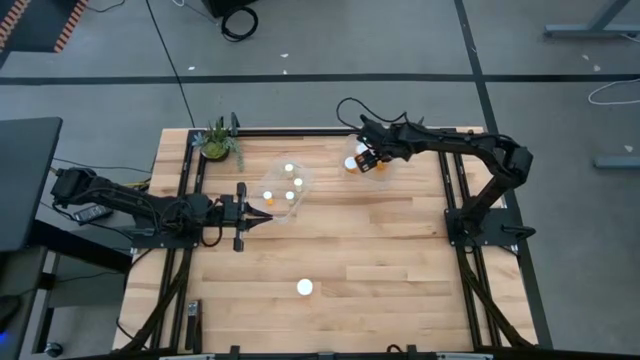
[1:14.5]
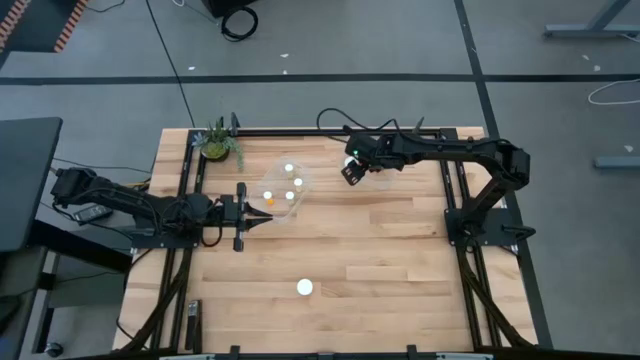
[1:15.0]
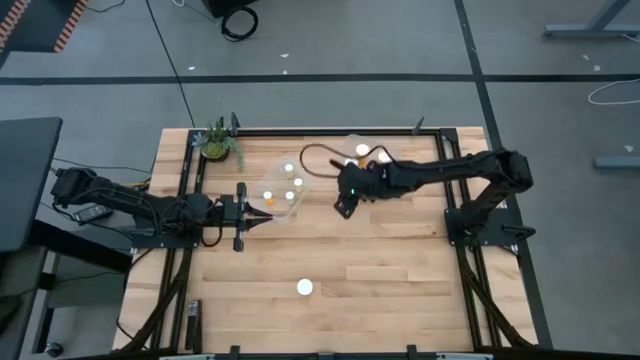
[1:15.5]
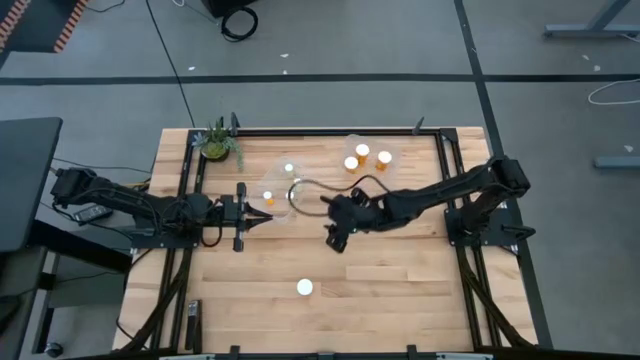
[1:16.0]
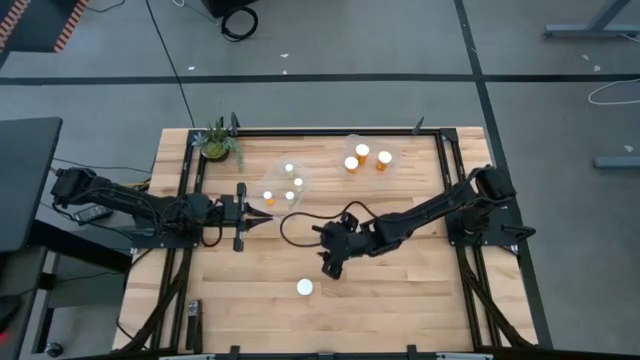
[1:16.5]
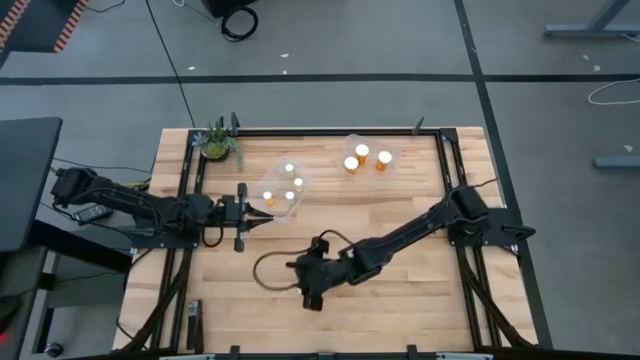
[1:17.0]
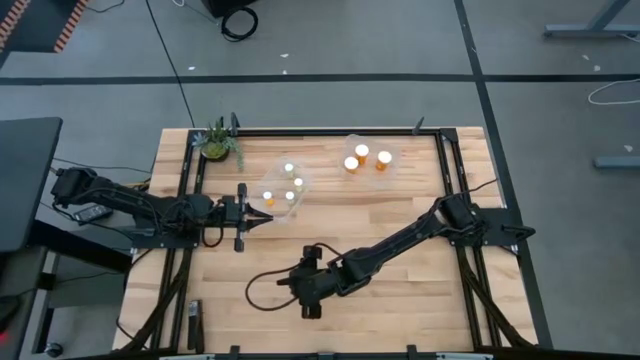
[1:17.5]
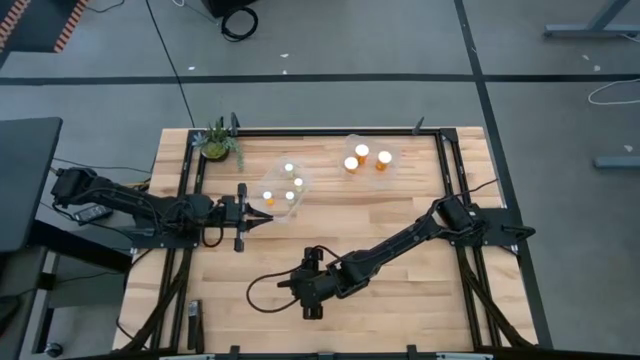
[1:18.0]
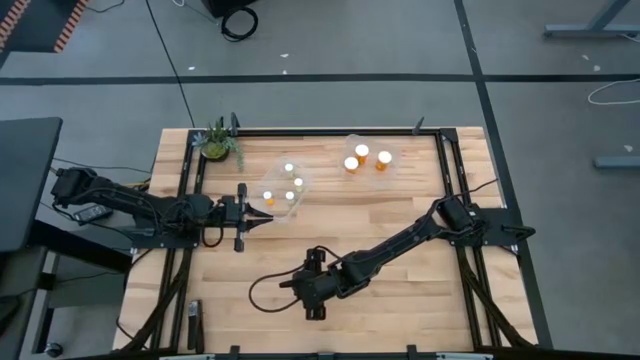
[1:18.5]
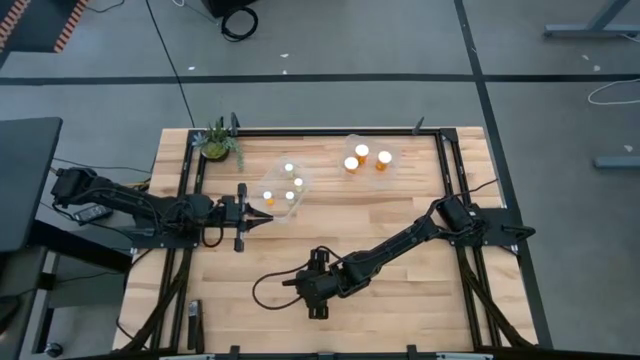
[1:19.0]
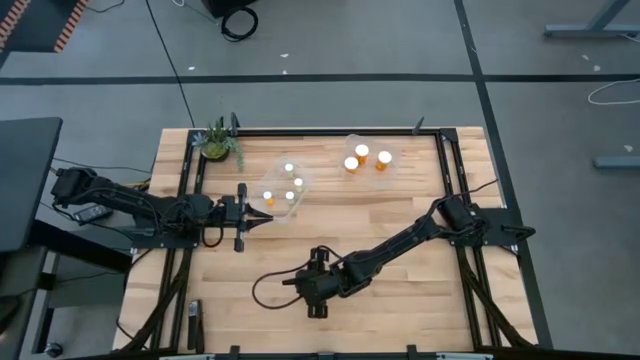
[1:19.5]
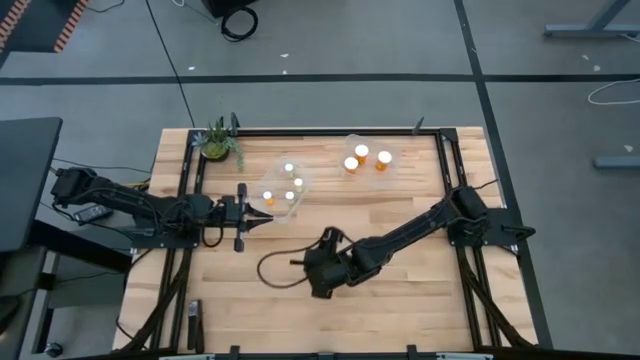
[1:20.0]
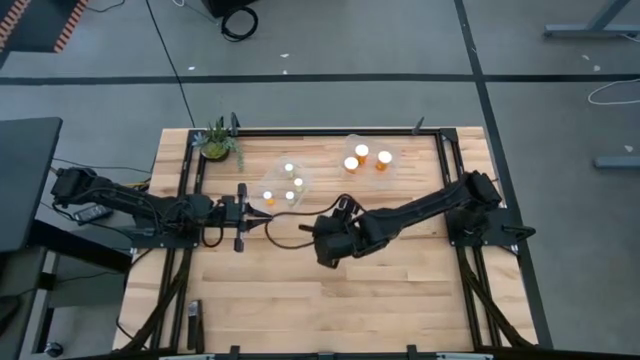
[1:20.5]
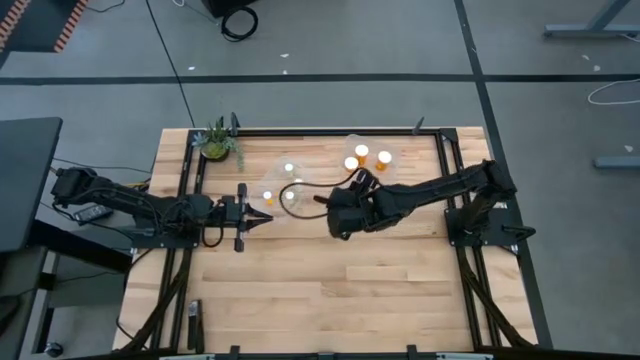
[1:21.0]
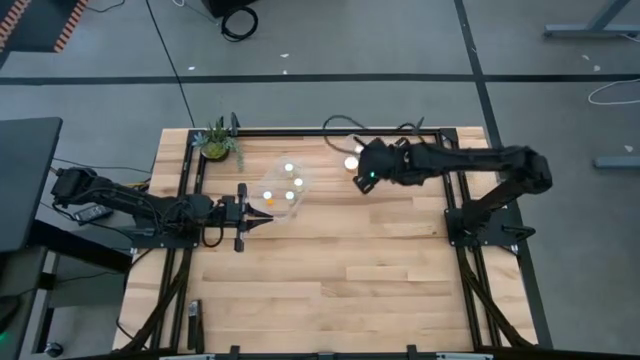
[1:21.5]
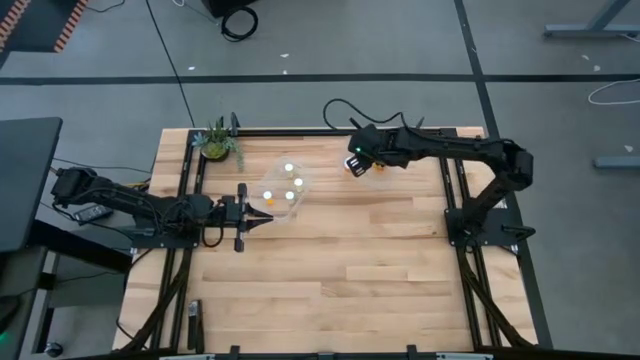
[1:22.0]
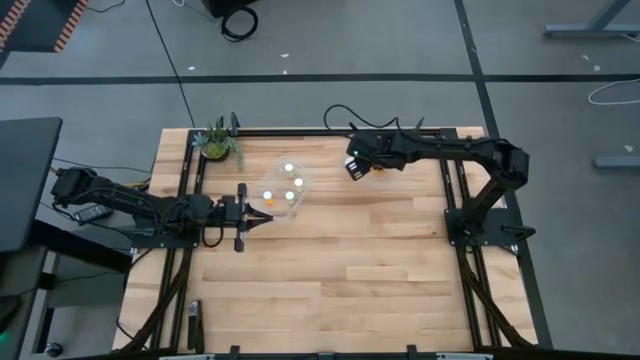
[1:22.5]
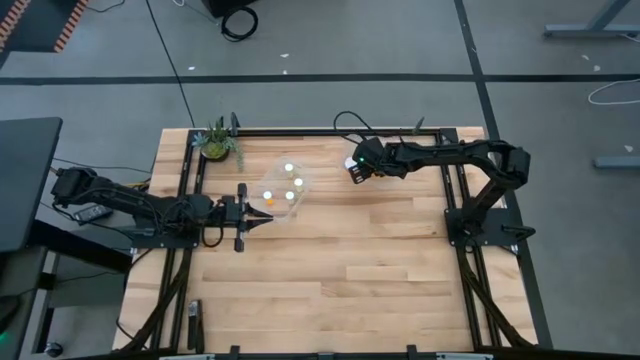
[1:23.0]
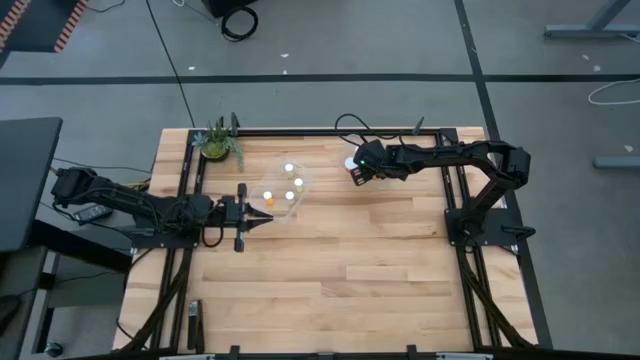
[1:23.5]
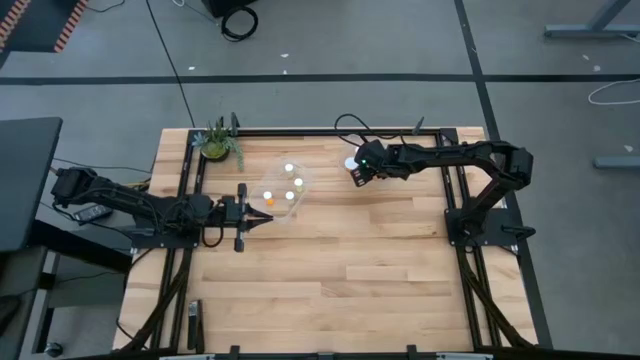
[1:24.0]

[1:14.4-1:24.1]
Task: Pick and place medicine bottles into bin by pill shape (circle, oval)
Put the big orange pill bottle into the right transparent bin

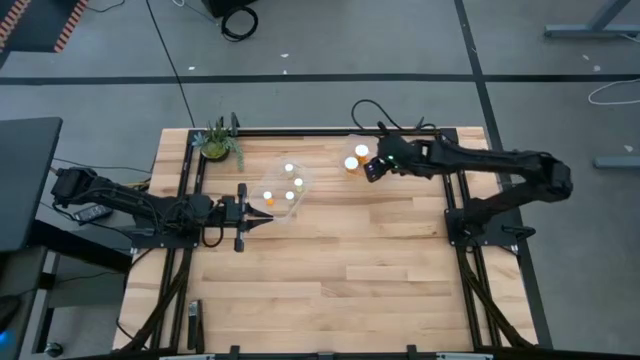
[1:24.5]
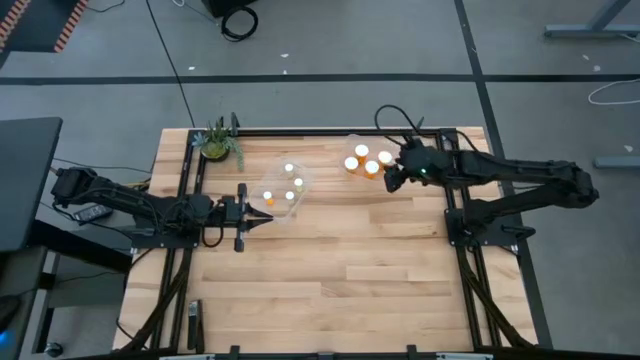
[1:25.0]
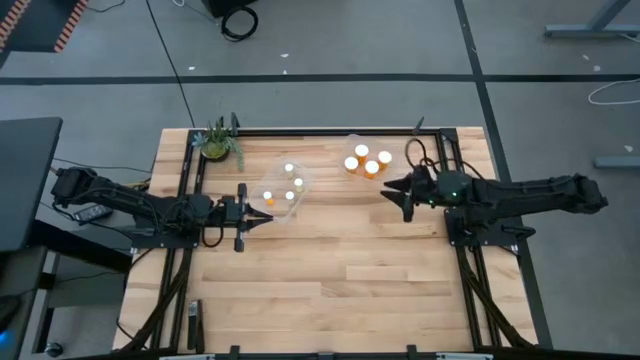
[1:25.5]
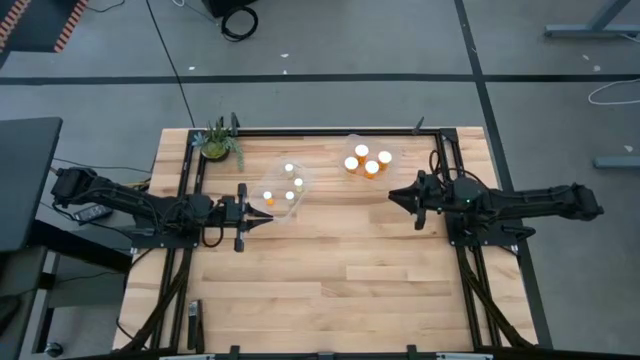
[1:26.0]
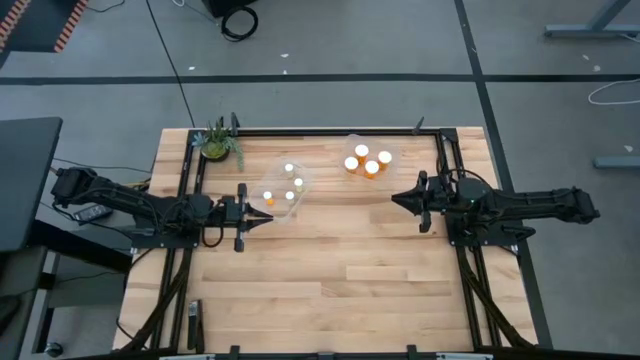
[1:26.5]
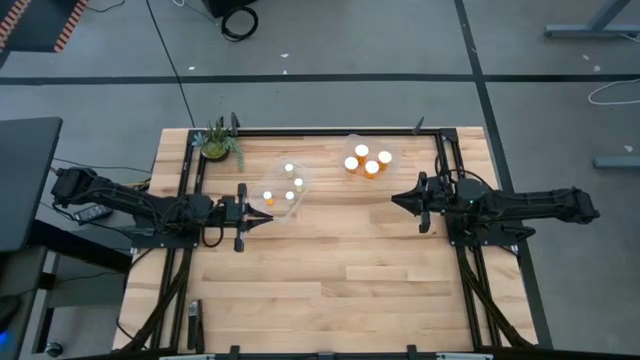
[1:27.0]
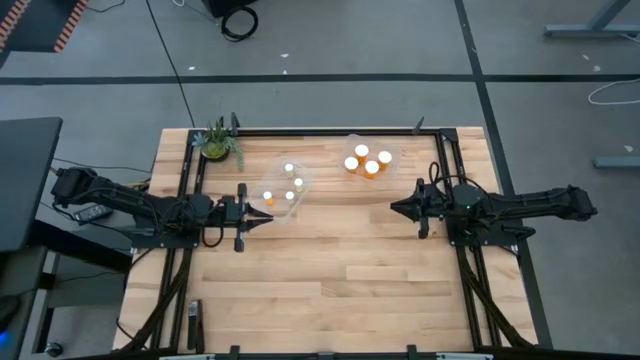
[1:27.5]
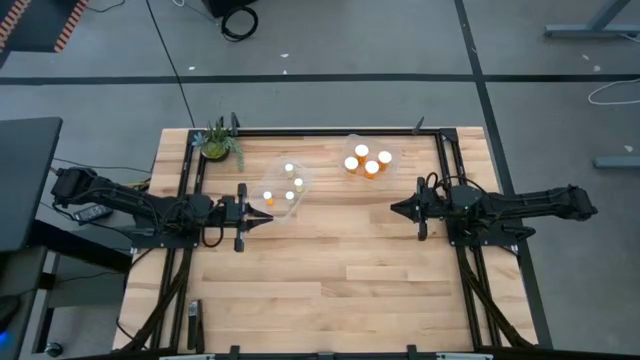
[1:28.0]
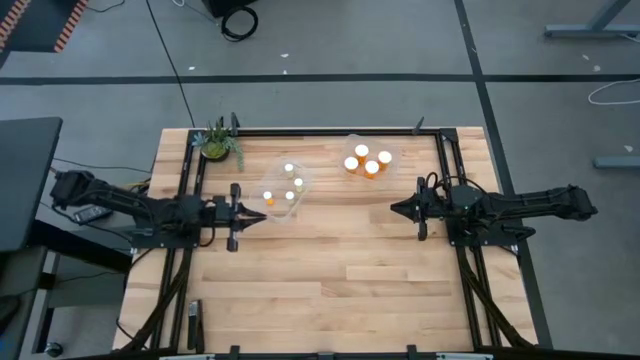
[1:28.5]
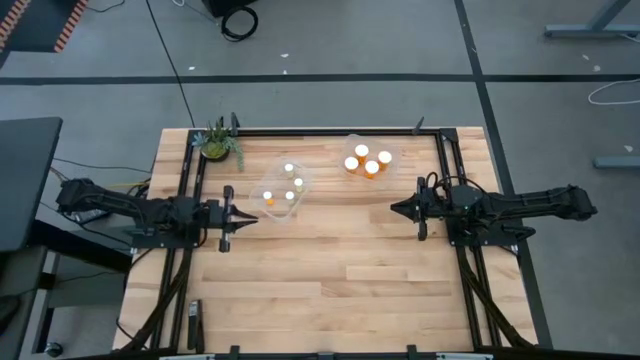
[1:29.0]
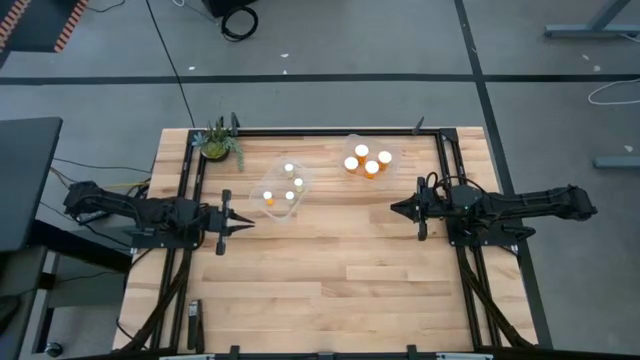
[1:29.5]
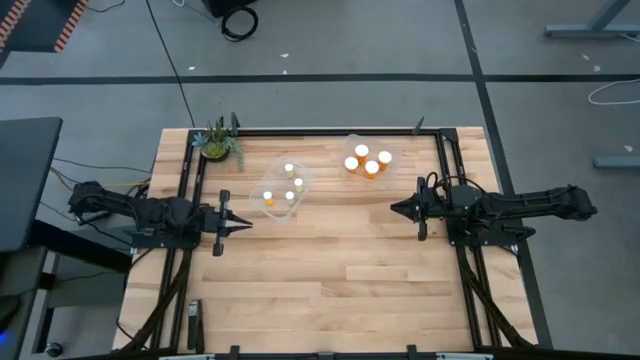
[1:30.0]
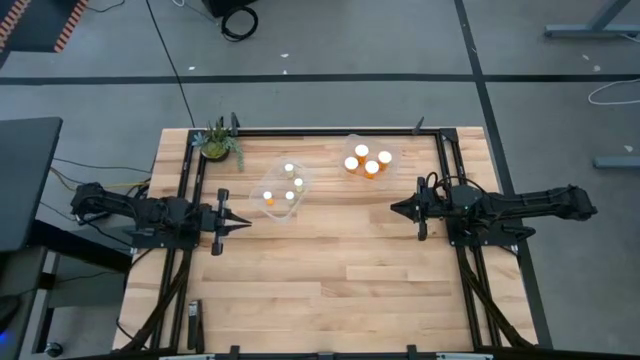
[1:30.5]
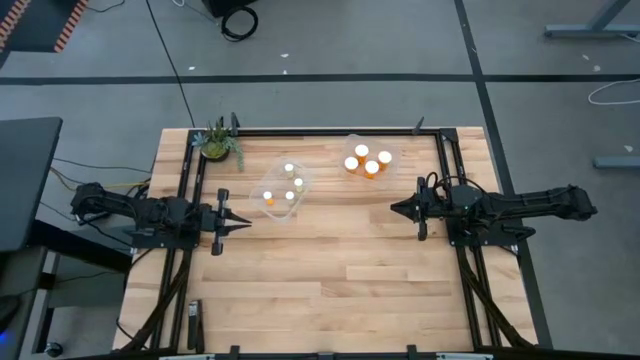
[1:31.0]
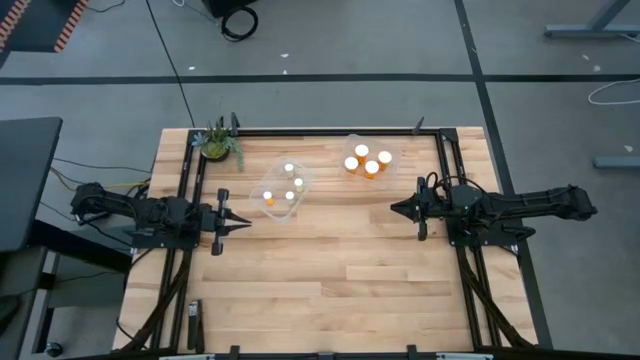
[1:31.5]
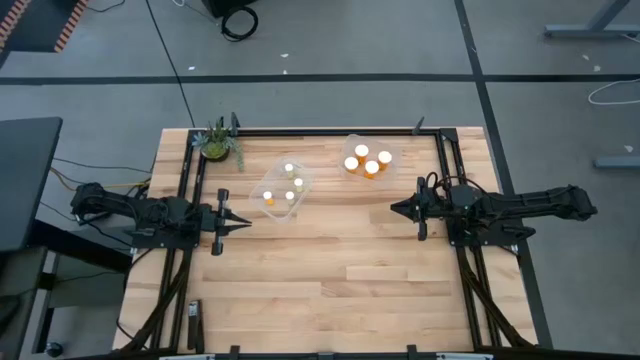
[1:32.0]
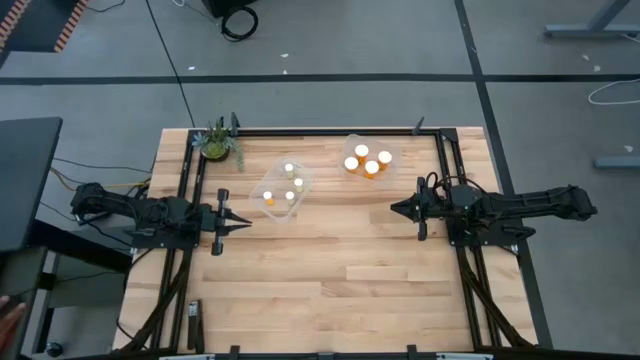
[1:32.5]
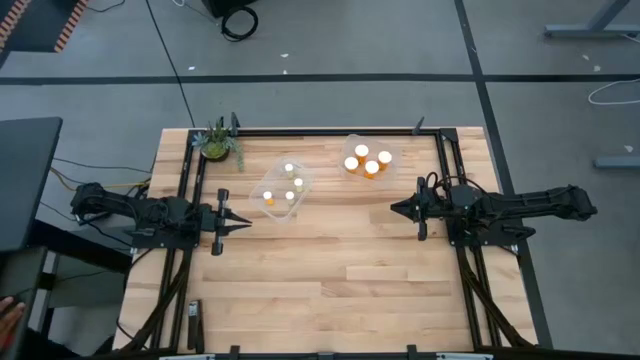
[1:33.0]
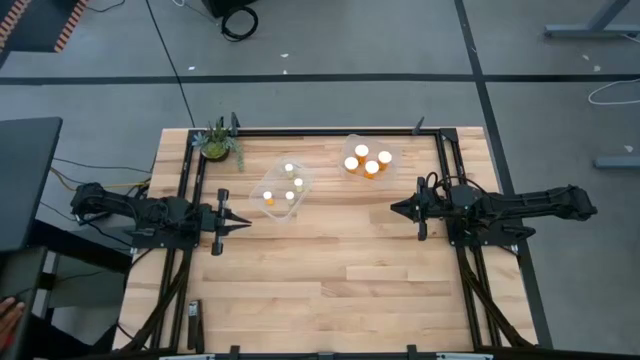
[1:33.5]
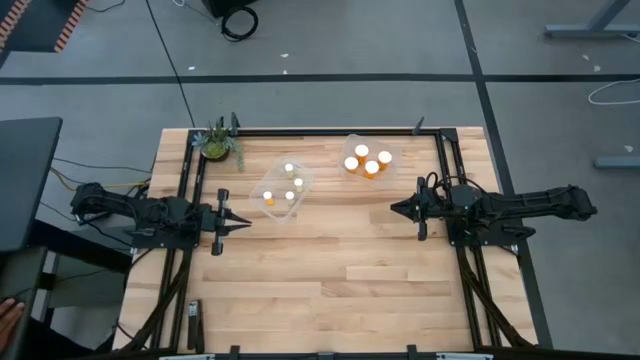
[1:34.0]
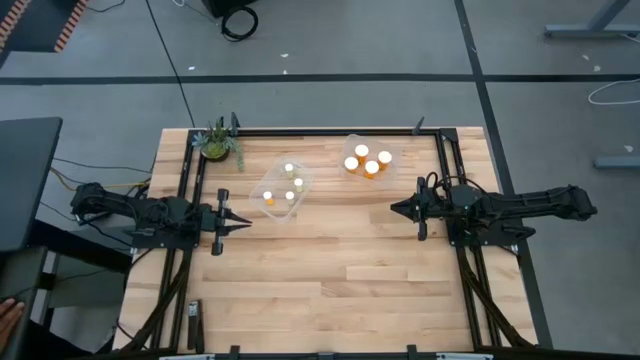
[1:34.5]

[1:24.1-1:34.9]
Return to Home Position

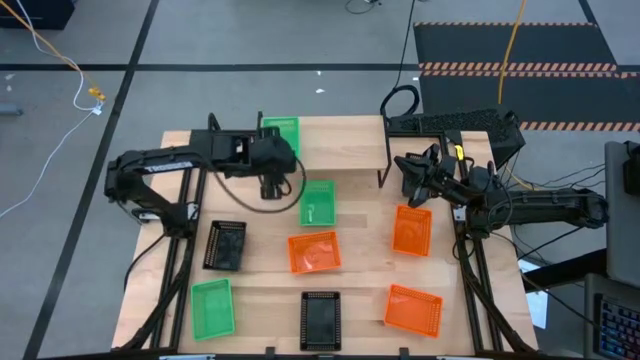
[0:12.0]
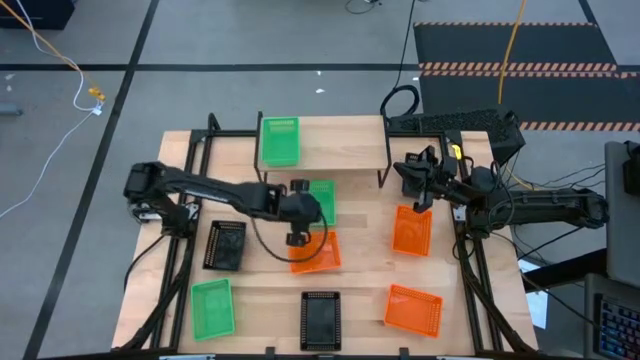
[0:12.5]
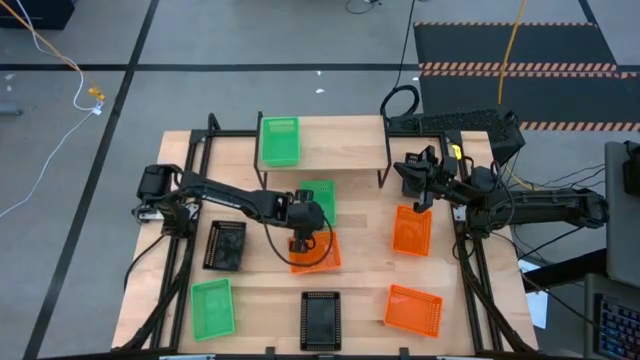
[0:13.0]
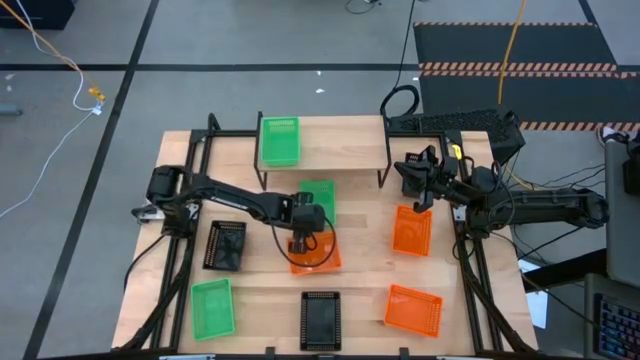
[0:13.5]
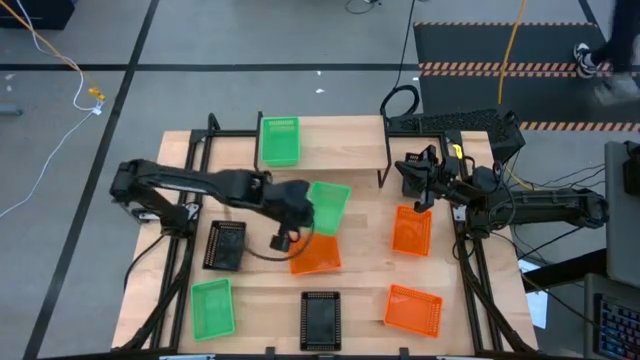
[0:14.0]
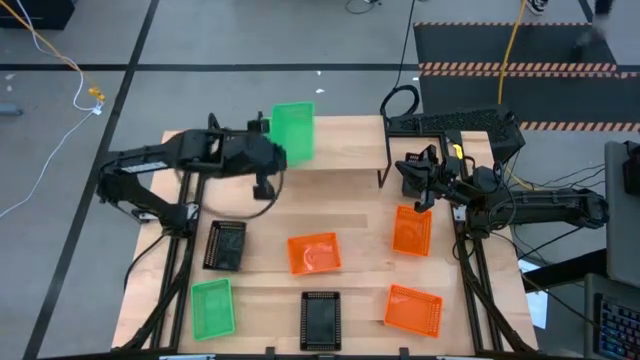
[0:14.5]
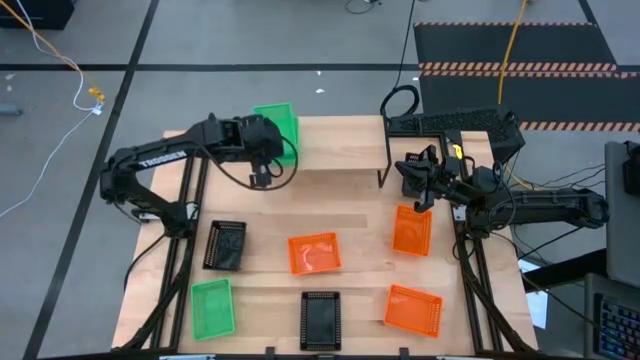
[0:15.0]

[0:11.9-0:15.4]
Task: Stack baskets on shelf by color
Stack the top green bin on top of the green bin on the shelf
